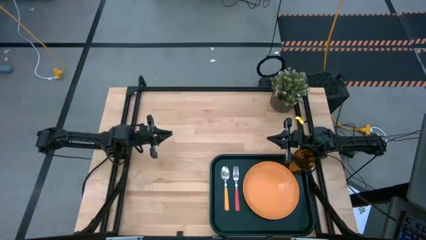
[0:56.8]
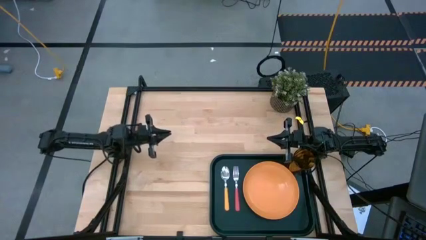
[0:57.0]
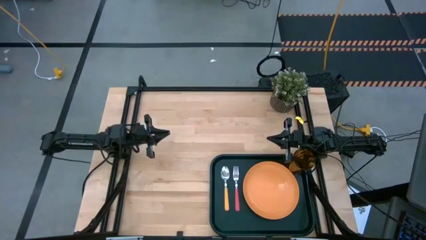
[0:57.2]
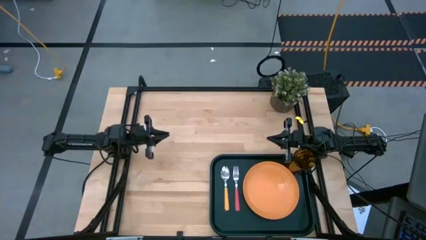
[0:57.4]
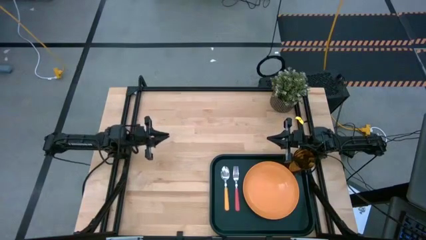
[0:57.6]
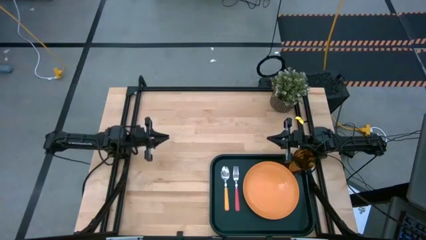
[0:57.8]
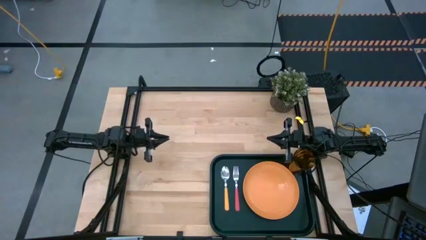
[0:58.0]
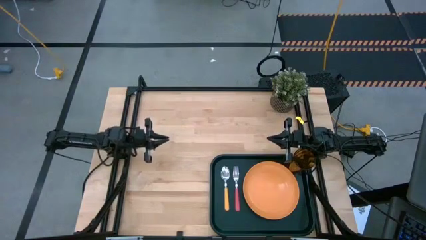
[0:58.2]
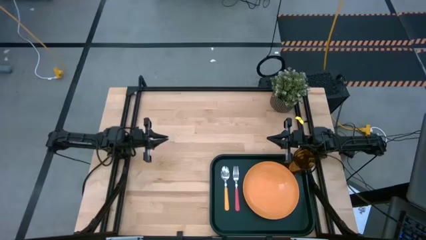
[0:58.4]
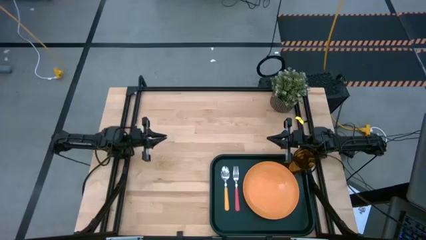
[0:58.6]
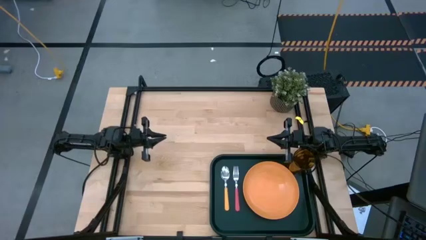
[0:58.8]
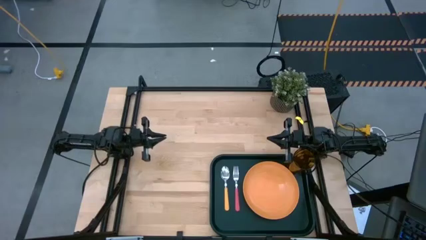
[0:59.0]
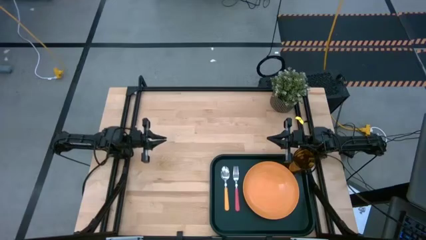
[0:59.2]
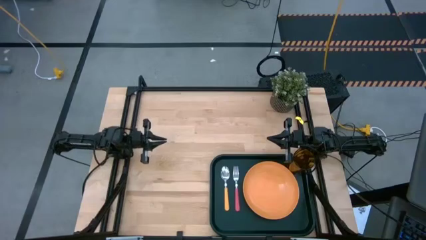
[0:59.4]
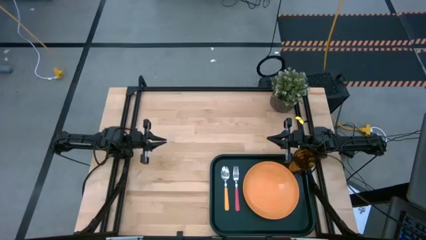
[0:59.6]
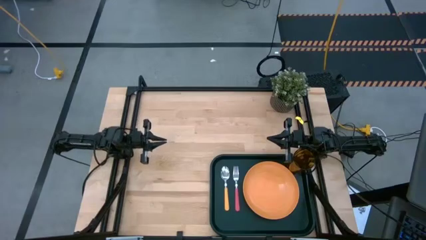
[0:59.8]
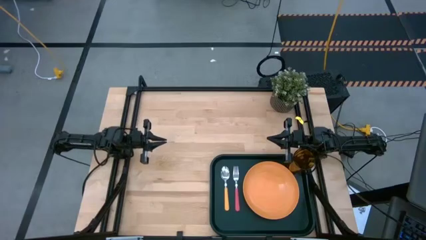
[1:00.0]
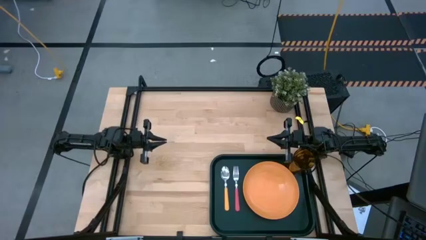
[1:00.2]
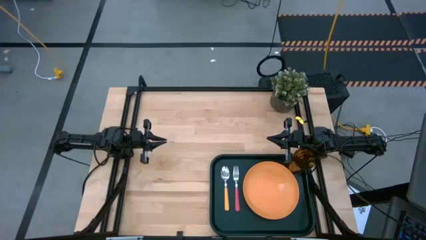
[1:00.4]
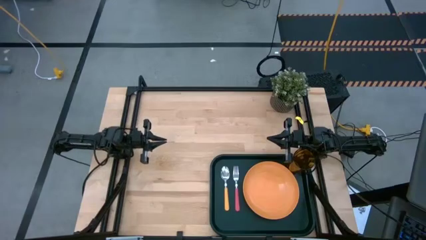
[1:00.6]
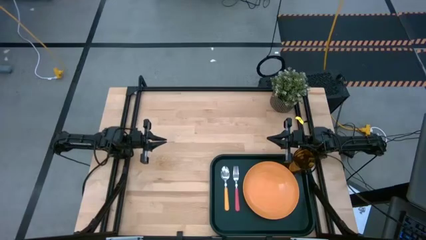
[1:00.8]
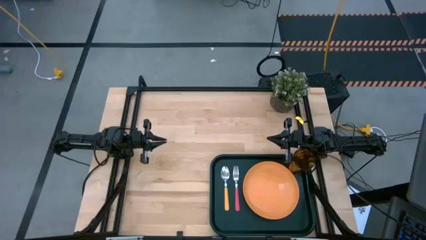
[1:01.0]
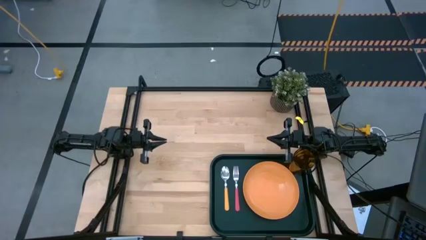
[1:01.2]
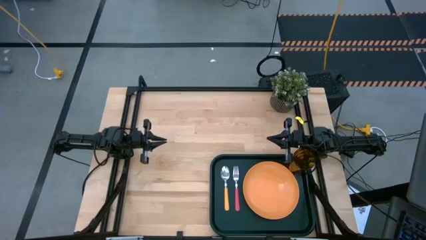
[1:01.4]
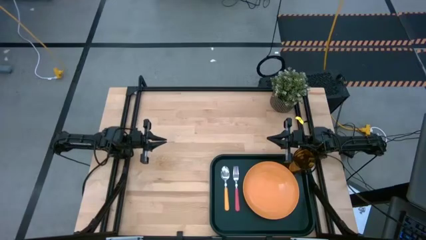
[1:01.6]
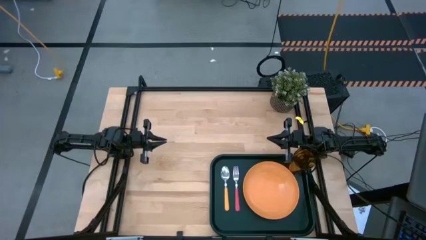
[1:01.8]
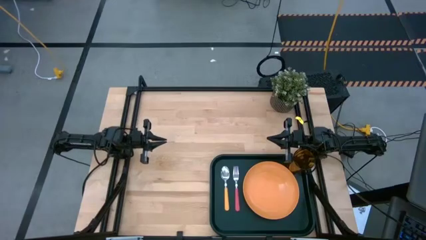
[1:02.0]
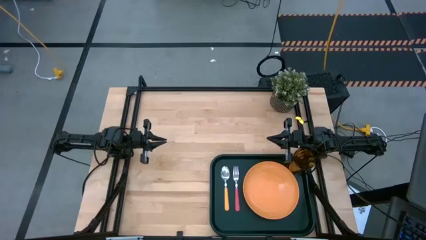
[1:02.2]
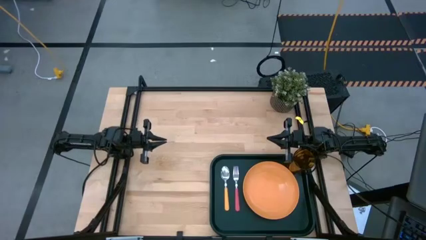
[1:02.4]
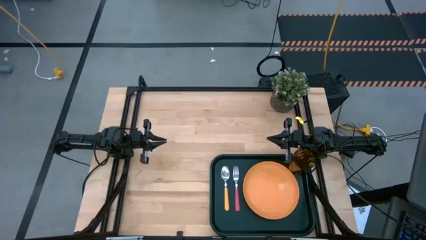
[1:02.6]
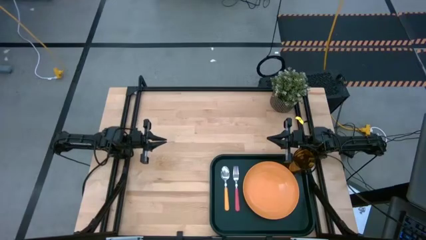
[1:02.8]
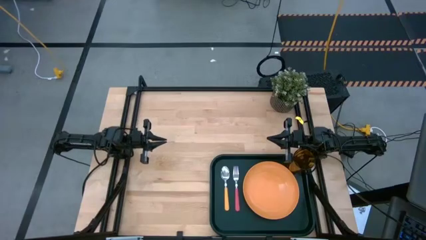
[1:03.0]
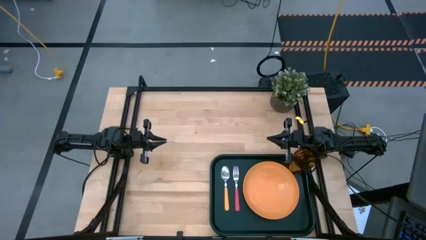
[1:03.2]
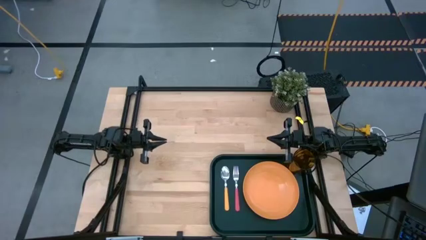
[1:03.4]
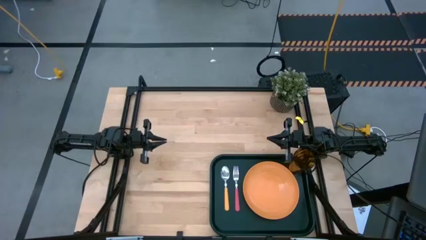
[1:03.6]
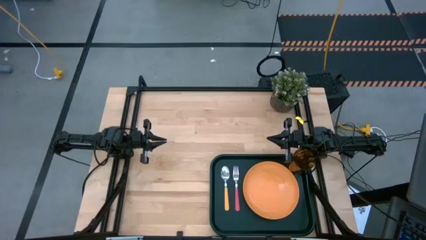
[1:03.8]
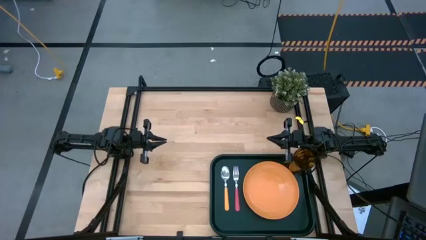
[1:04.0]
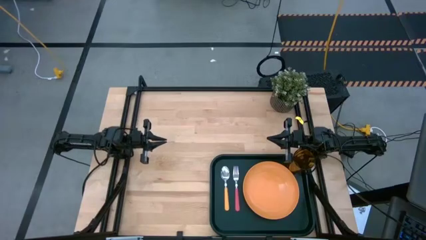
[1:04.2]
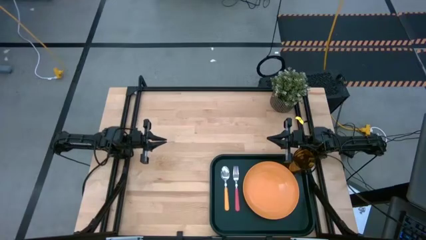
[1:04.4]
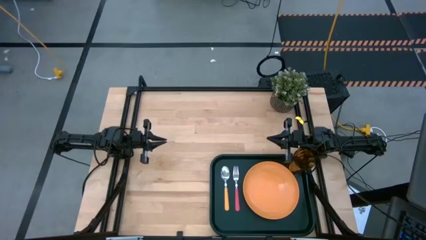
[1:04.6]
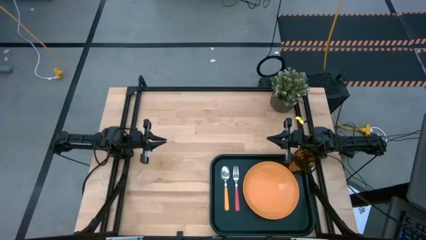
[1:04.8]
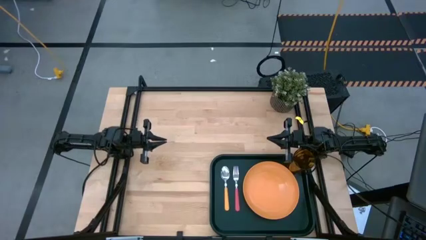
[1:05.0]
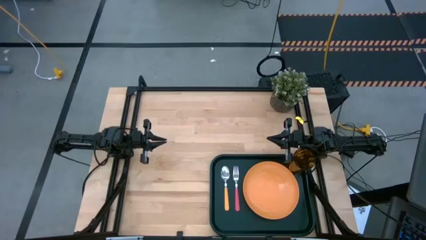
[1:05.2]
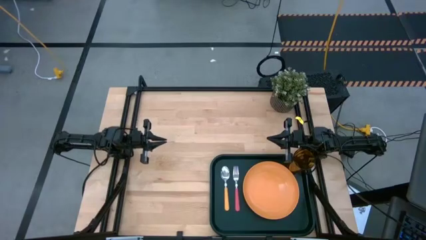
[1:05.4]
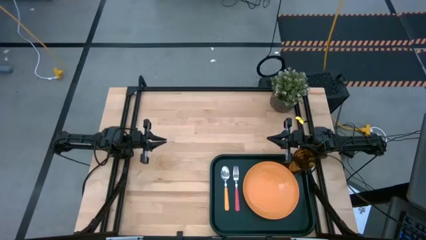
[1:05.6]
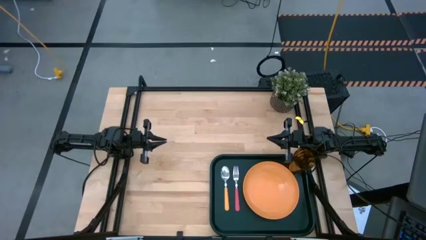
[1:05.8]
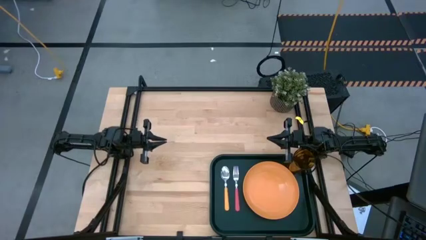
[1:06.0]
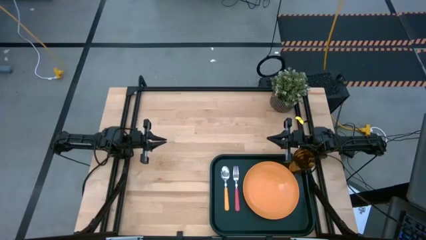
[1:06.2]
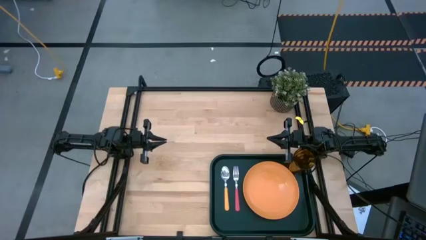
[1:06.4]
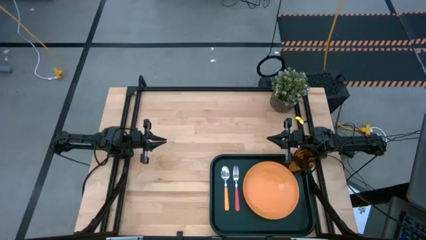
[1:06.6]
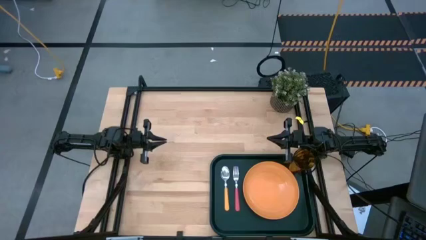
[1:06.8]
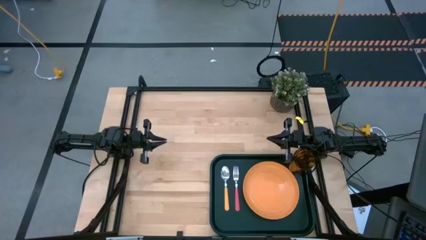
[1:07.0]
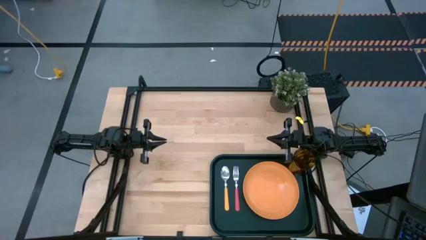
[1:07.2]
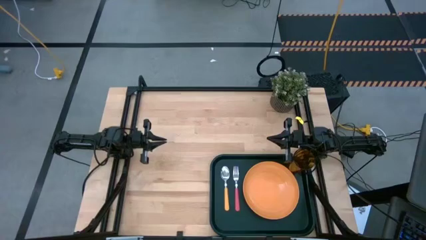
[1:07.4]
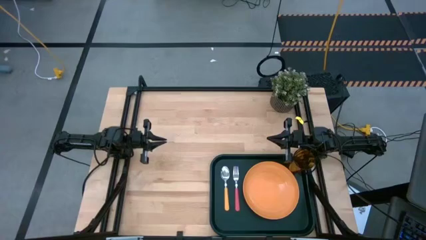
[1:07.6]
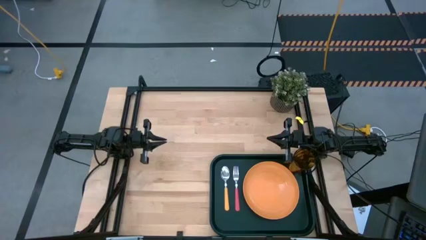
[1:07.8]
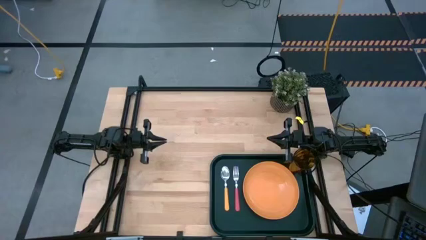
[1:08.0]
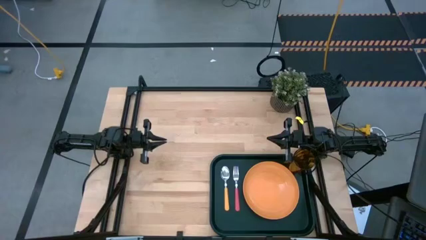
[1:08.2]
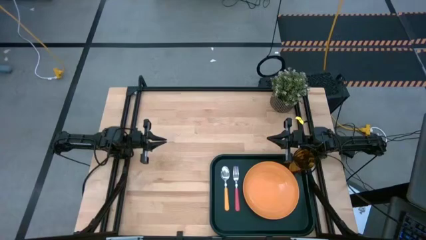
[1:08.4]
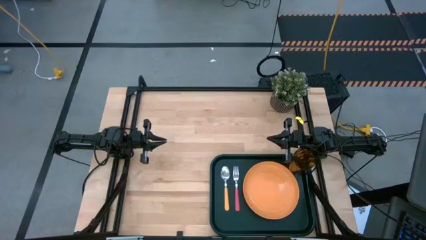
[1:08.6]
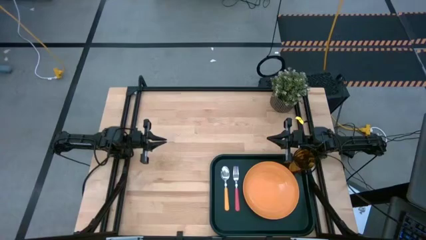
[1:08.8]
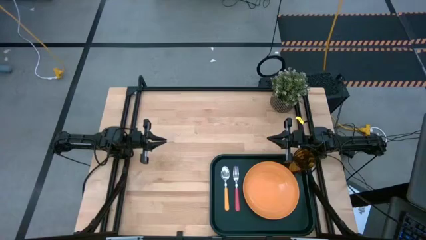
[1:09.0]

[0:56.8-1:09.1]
Task: Pick and place plate/cup/fork/spoon on tray
Return to Home Position

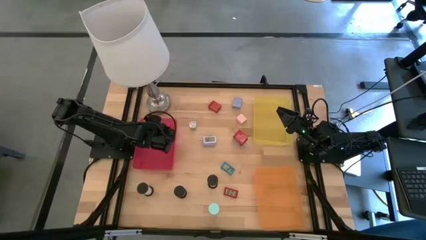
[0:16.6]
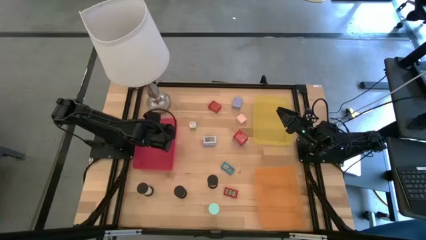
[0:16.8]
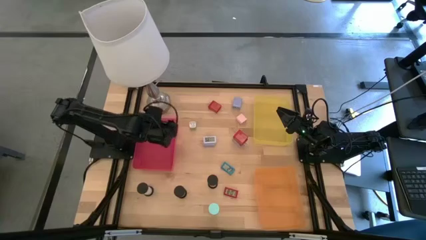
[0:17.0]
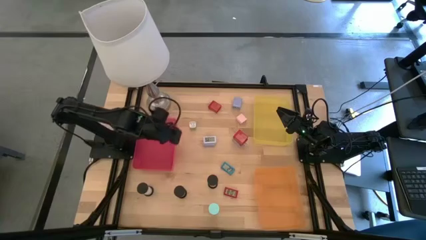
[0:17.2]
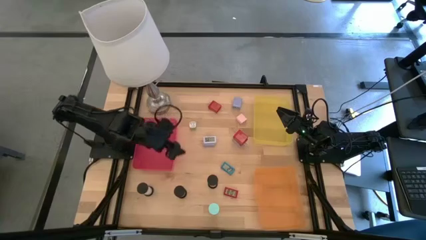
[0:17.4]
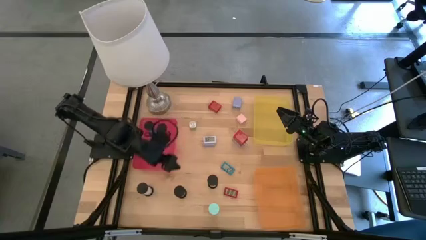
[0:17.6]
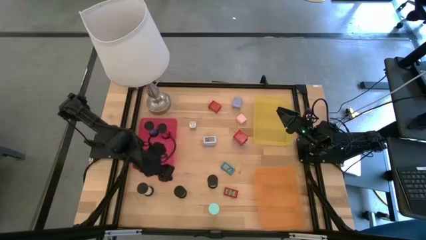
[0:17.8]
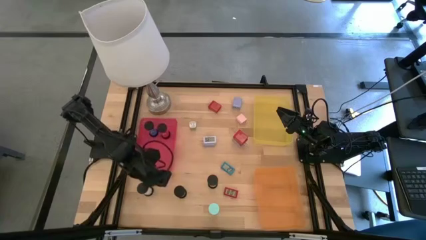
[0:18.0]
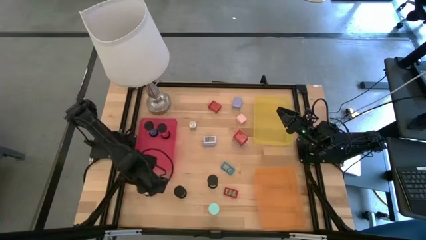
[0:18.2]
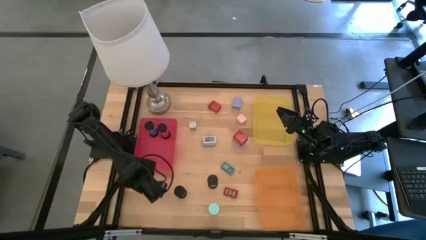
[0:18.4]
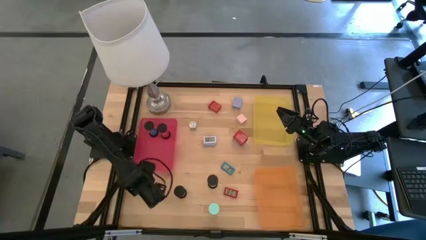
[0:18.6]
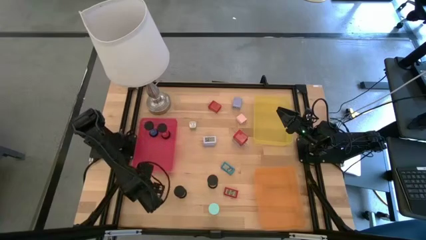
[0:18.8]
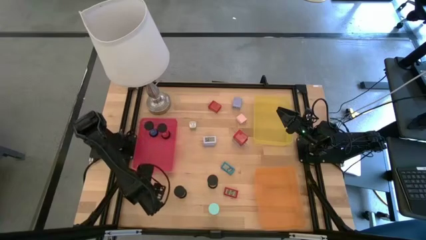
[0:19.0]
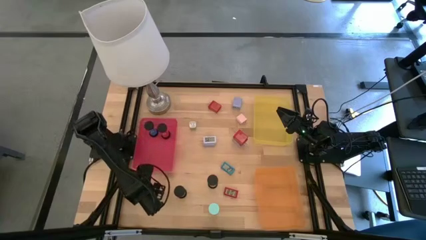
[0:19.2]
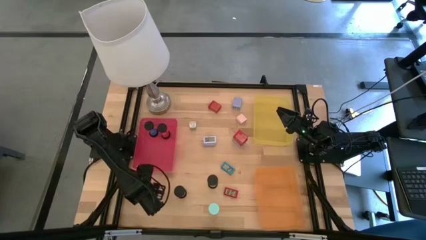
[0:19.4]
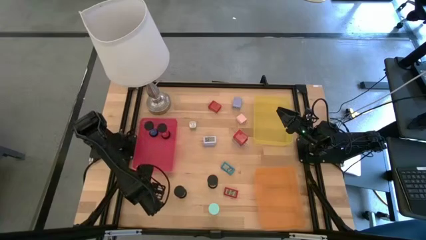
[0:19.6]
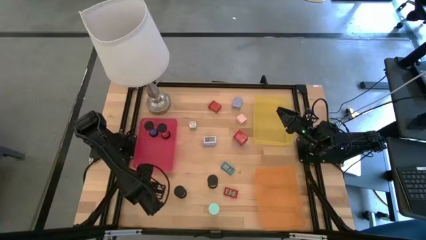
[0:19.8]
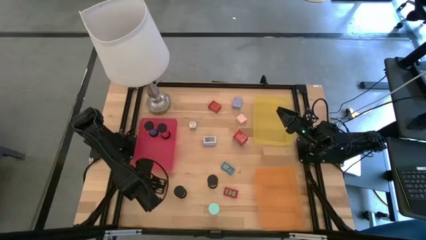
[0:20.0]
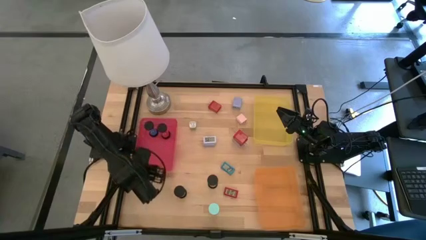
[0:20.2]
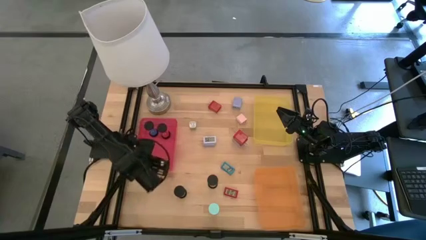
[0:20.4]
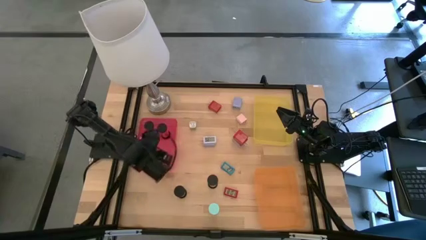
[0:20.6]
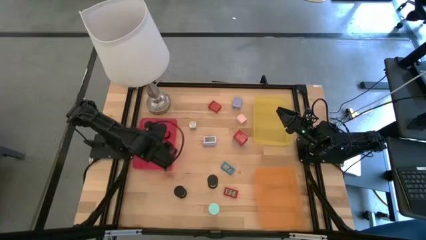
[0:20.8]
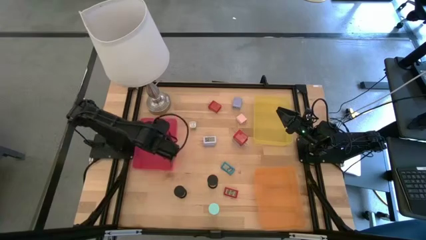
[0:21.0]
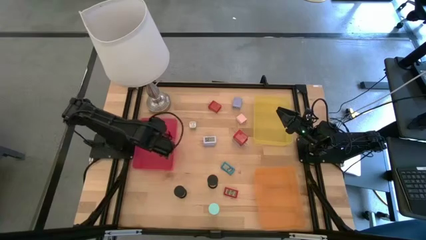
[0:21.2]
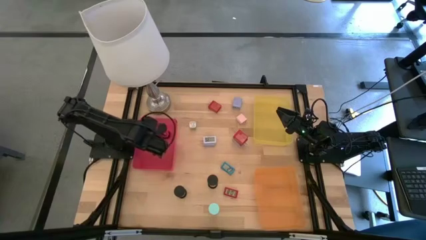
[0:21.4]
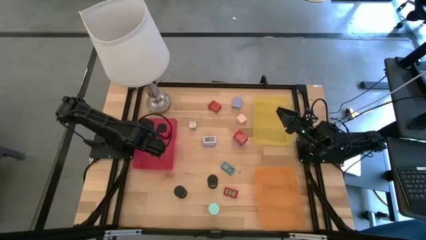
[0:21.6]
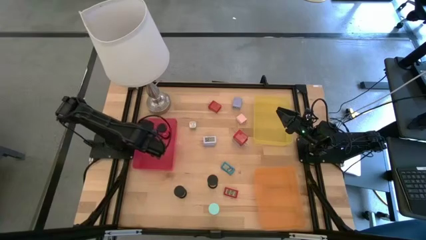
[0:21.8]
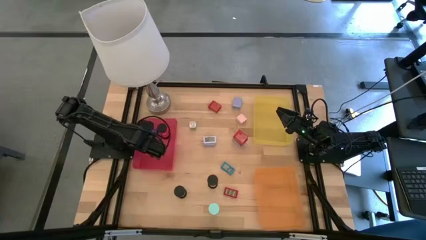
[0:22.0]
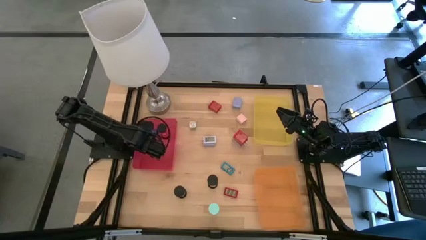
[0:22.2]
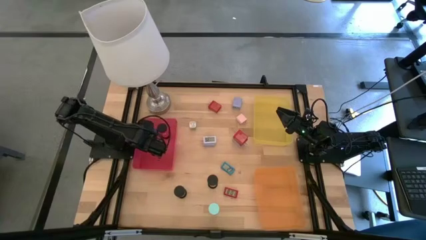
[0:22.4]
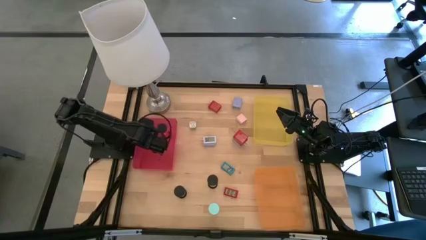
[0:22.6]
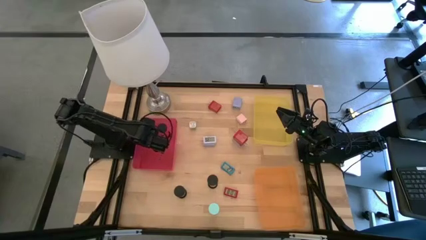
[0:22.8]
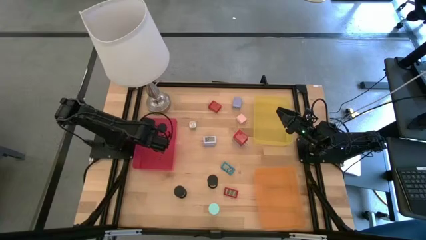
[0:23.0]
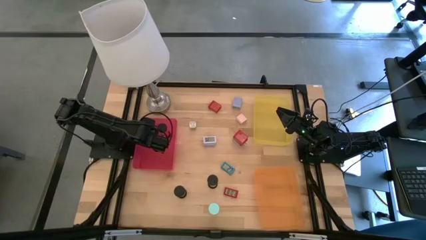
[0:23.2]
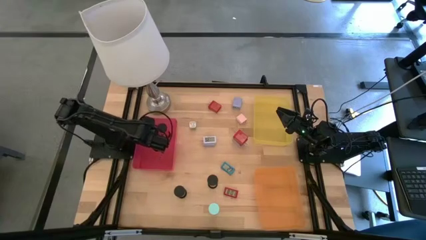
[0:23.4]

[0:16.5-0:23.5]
Task: Pick & Place Office items
Put the white hourglass timer into the red bin
